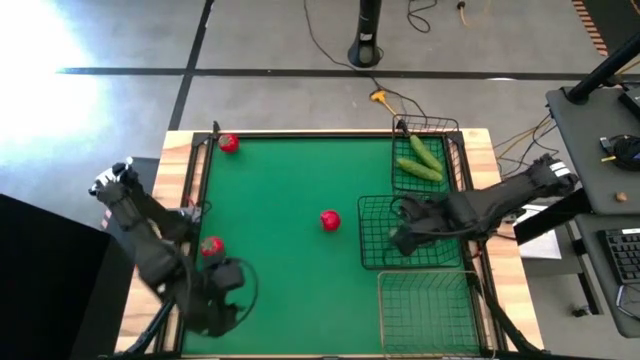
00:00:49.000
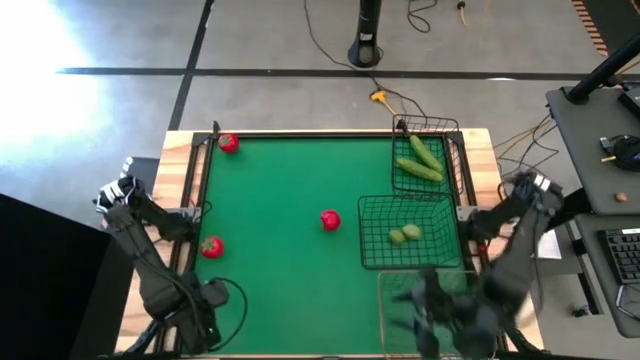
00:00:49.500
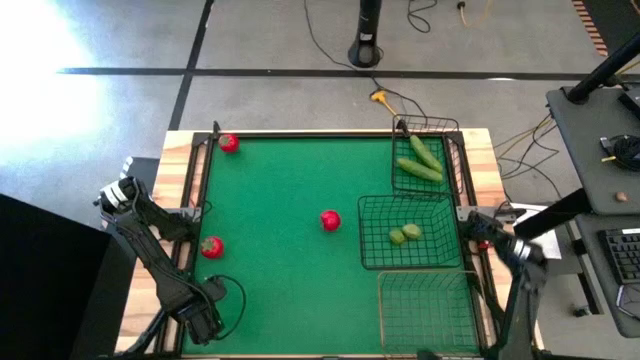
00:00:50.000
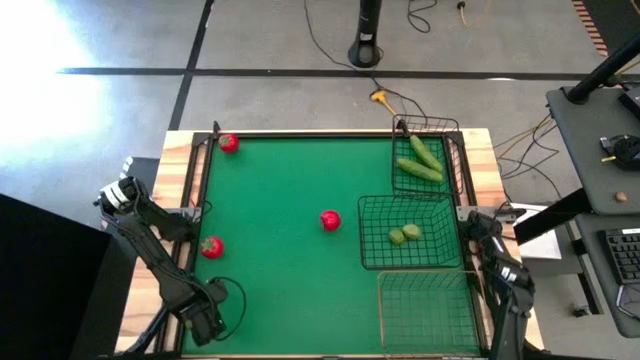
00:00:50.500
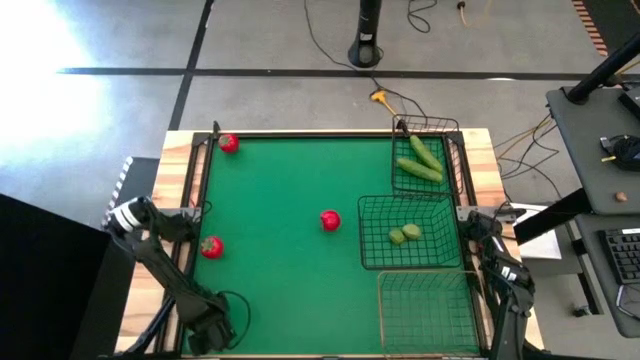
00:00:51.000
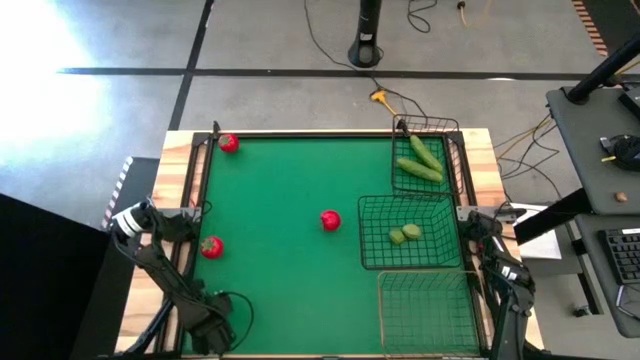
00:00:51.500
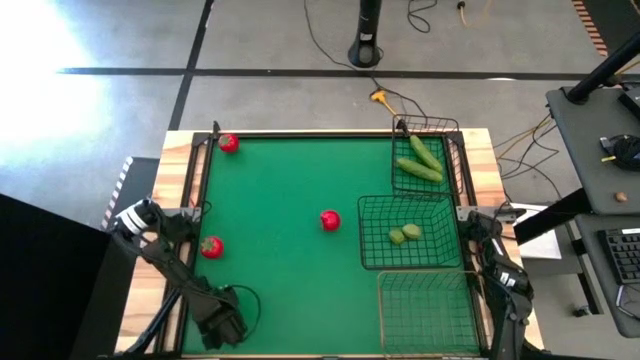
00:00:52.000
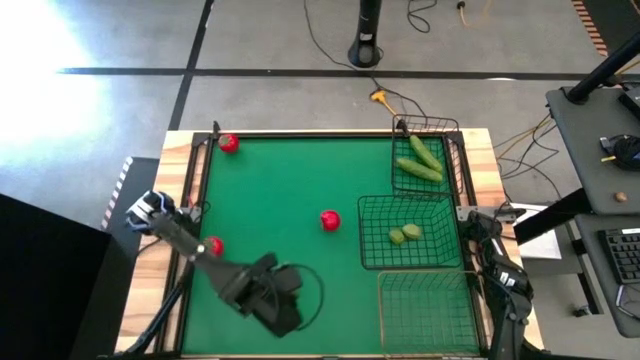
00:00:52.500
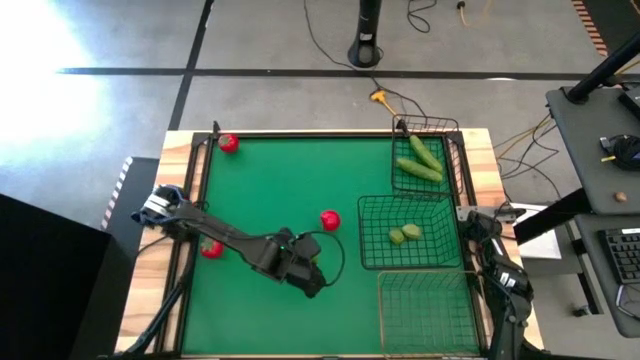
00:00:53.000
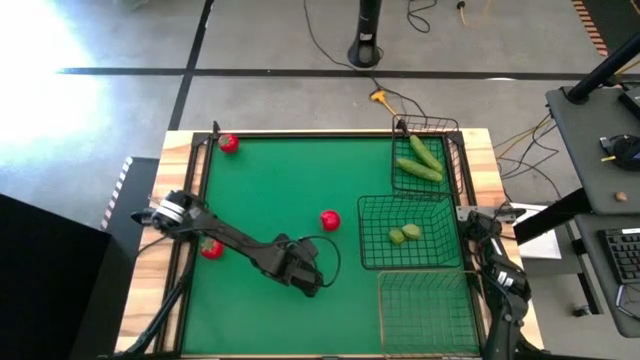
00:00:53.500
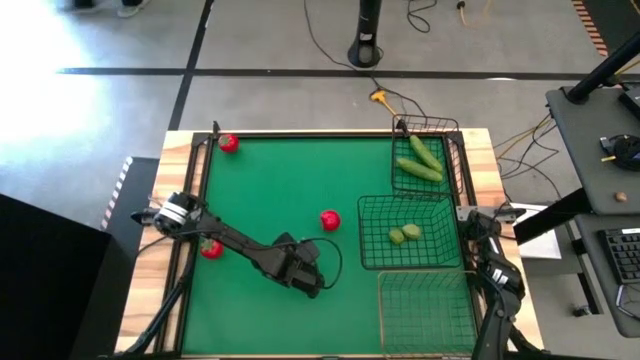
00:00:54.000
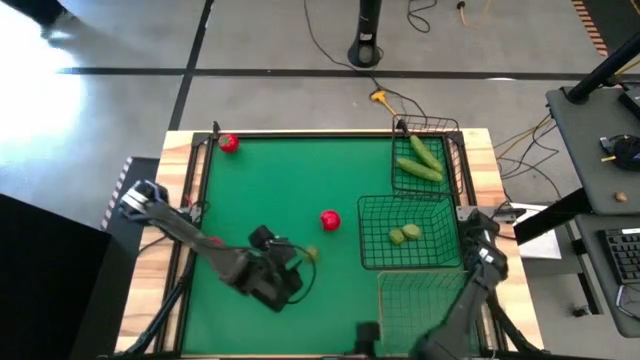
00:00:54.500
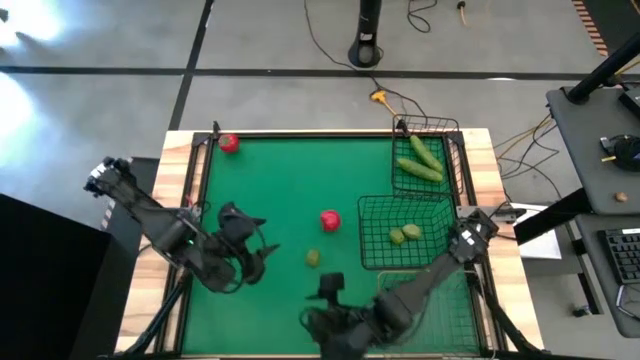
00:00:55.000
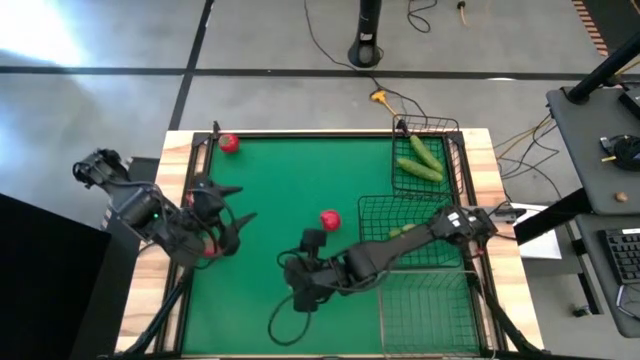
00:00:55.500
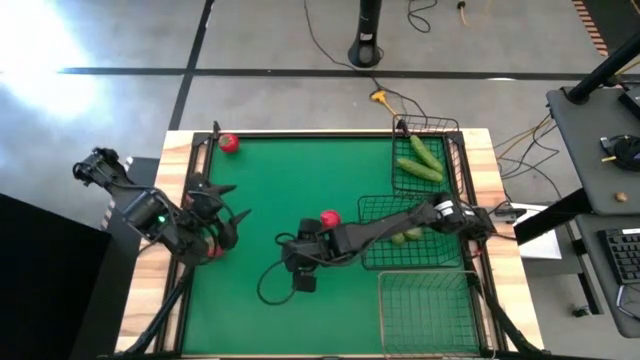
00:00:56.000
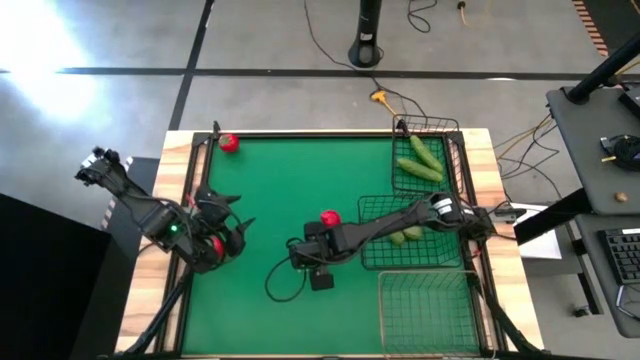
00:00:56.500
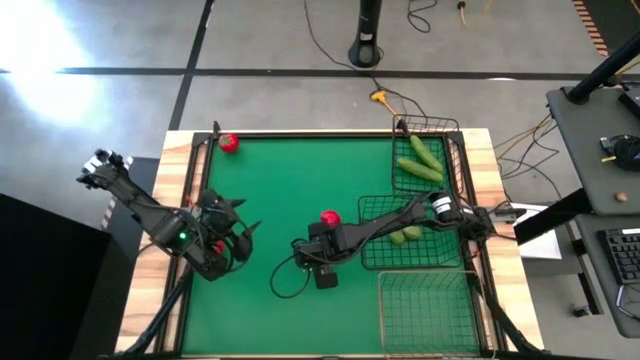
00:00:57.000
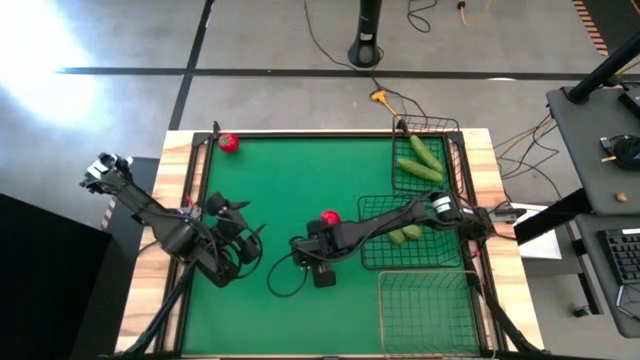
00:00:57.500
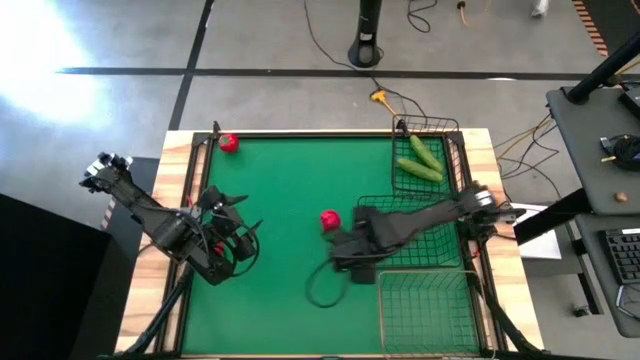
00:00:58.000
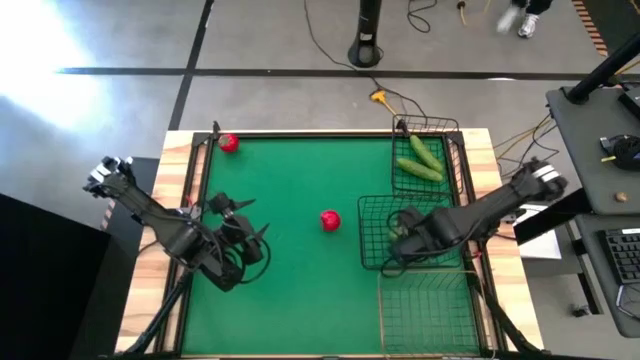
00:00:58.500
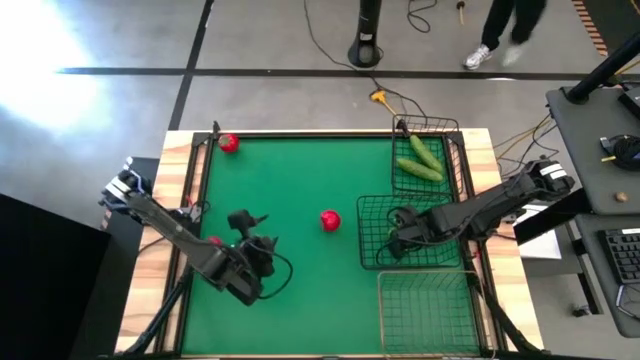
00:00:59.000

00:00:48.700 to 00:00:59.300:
Task: Sort produce into baskets
Put the lime into the bottom black wire basket

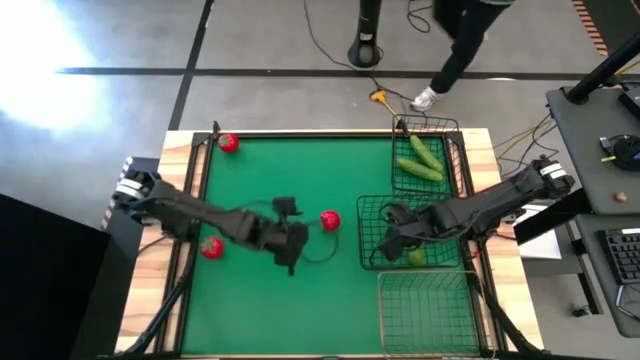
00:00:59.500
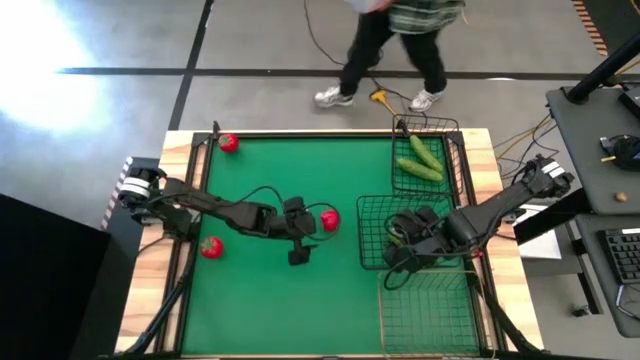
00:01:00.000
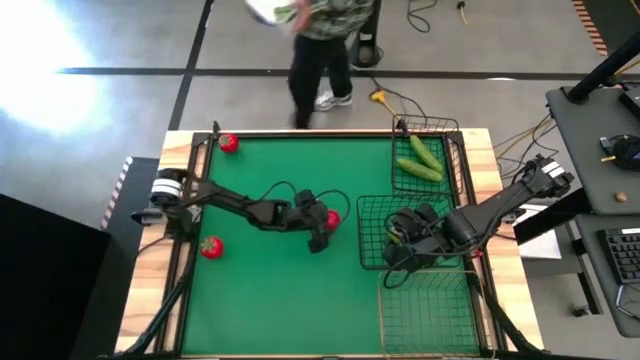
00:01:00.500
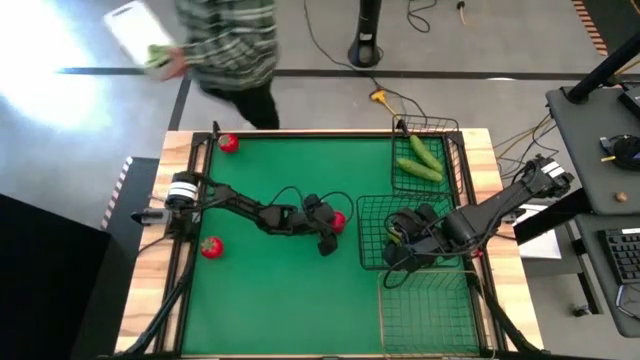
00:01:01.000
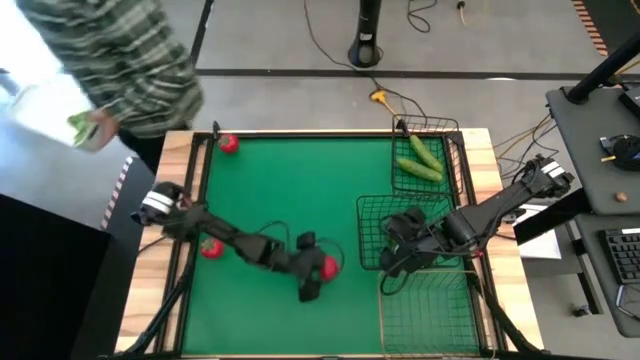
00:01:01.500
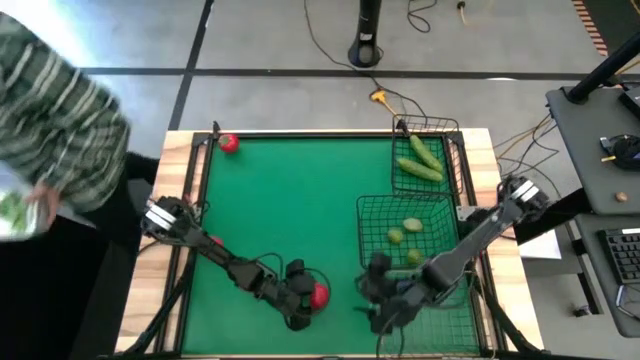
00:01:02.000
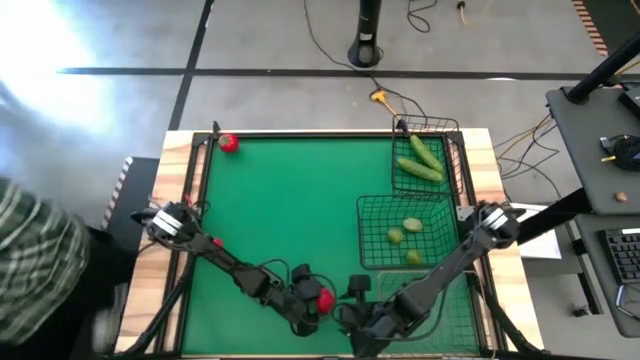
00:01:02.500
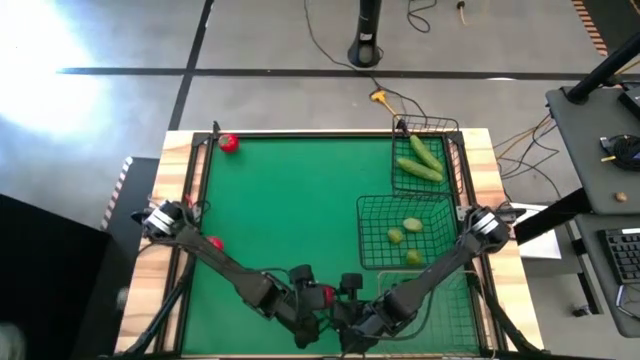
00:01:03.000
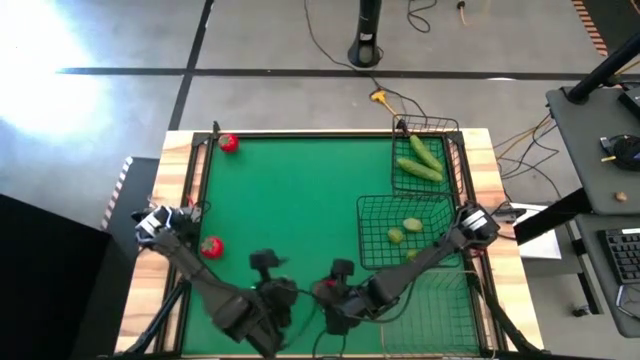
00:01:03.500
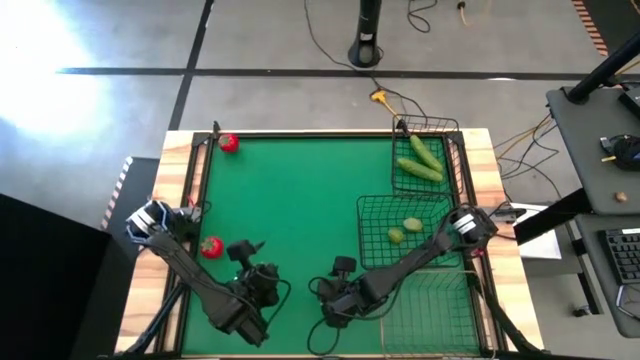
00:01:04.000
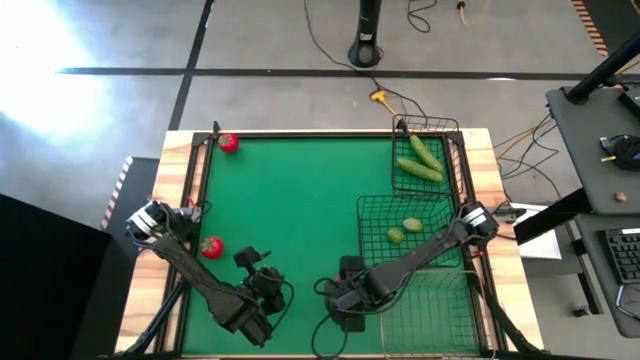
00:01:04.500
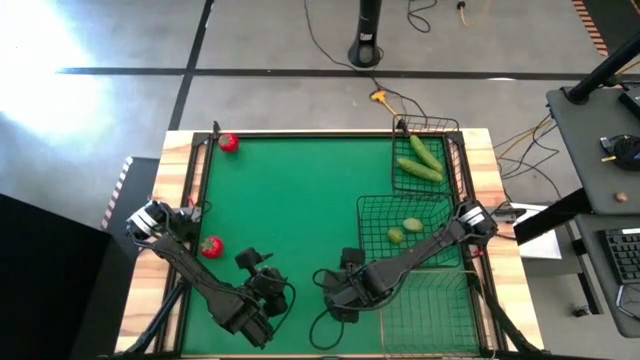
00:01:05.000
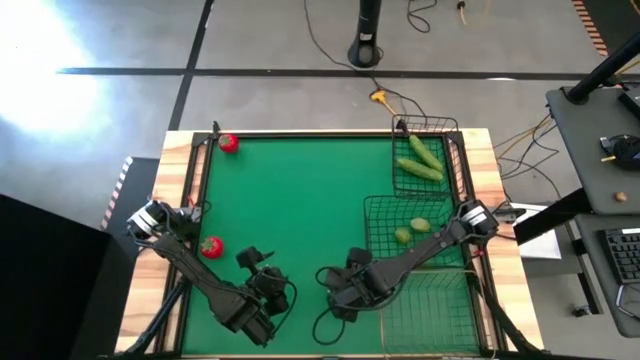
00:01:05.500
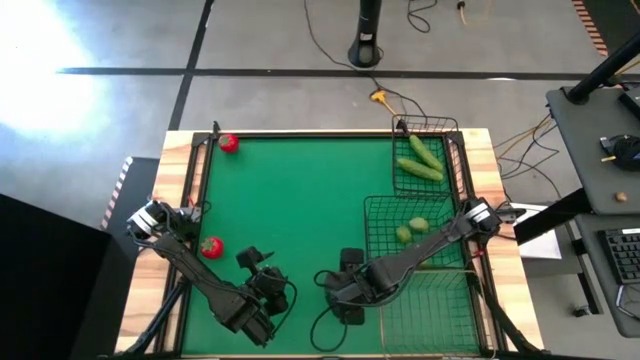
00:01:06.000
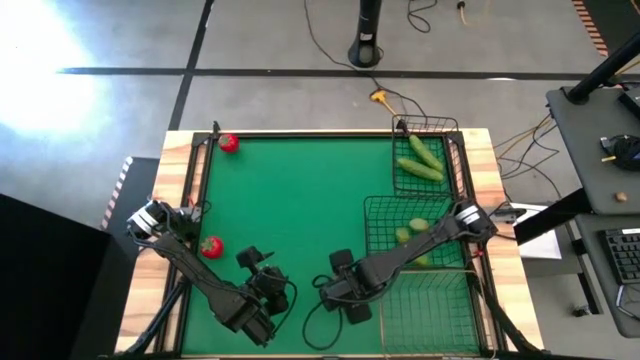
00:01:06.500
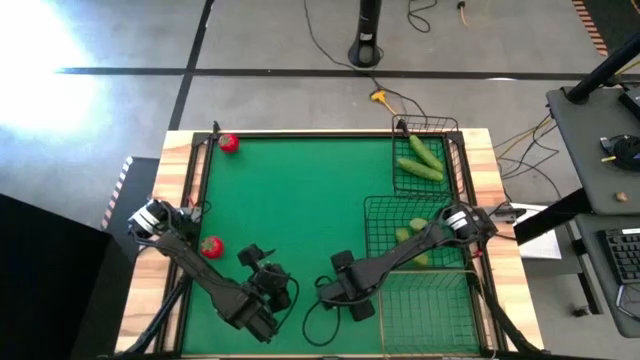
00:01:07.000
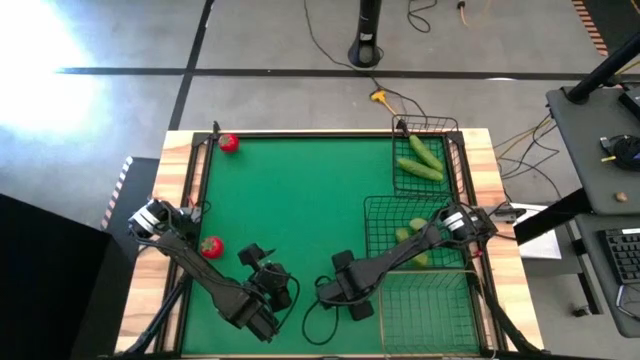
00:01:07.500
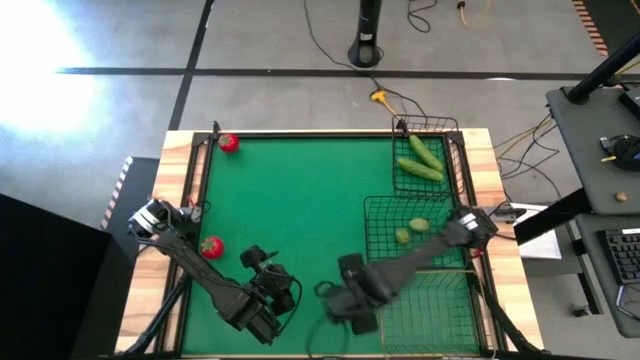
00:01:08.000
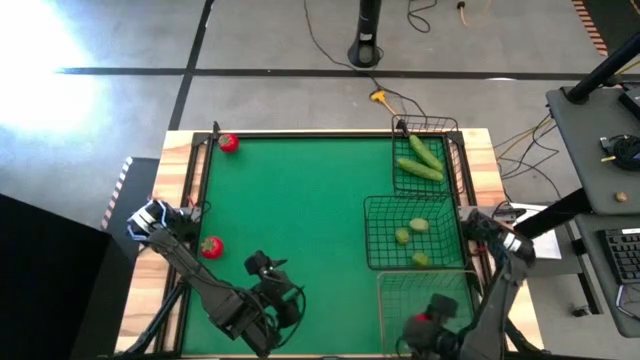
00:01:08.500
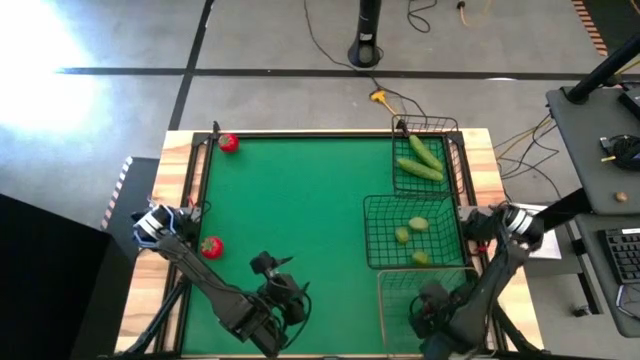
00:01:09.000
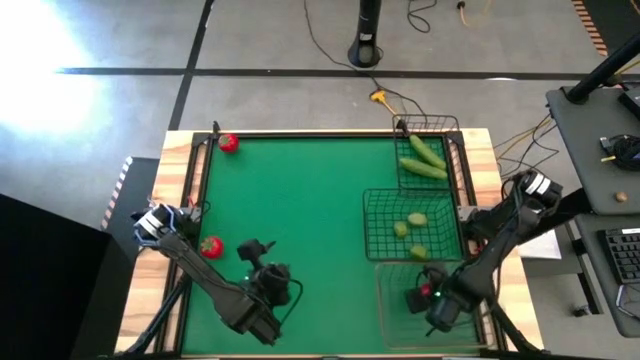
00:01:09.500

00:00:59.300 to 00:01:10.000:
Put the middle tomato into the gold wire basket
